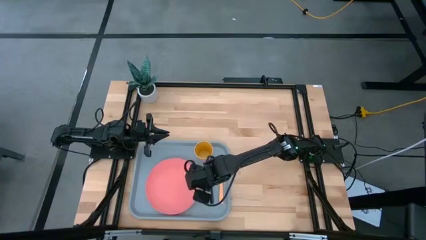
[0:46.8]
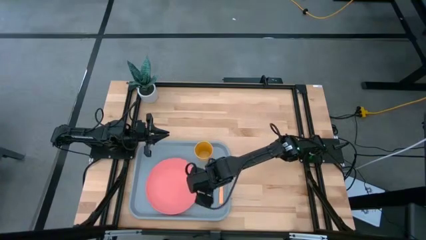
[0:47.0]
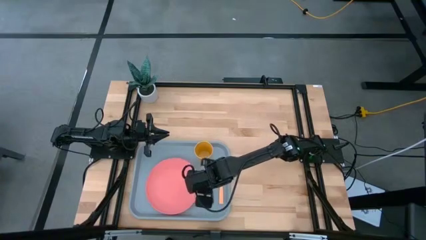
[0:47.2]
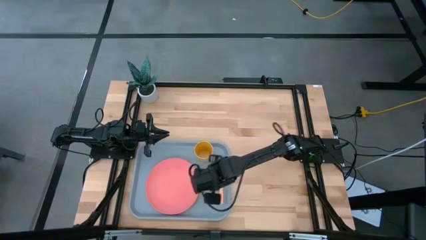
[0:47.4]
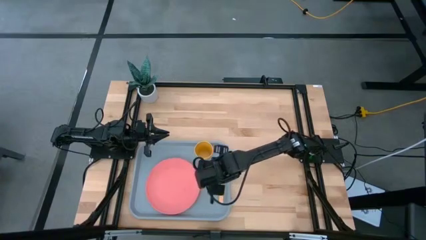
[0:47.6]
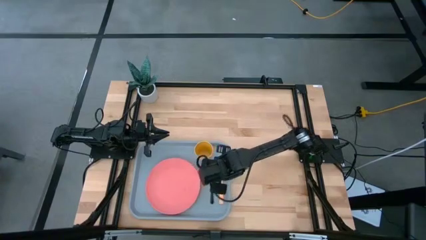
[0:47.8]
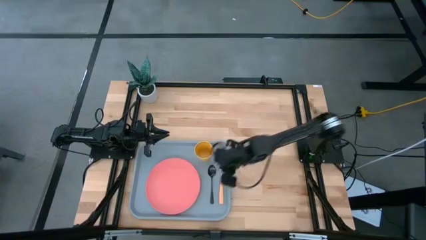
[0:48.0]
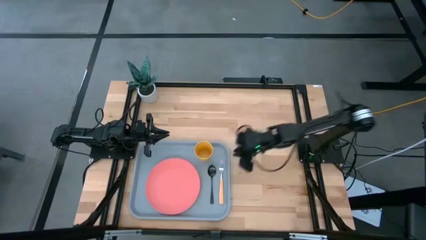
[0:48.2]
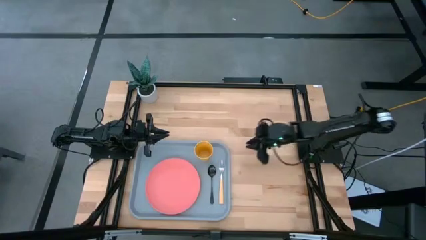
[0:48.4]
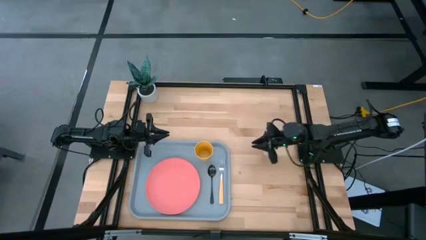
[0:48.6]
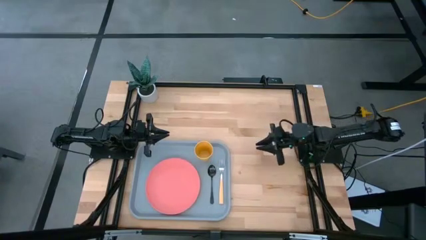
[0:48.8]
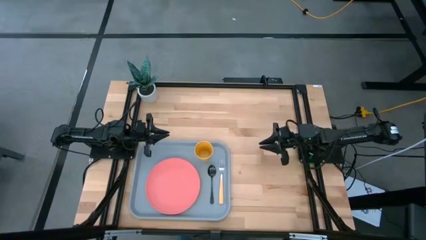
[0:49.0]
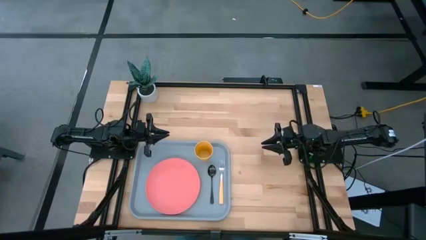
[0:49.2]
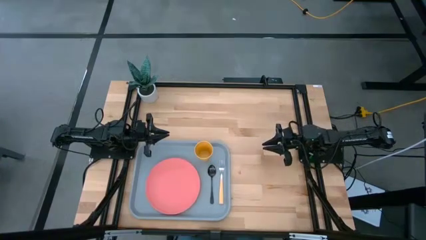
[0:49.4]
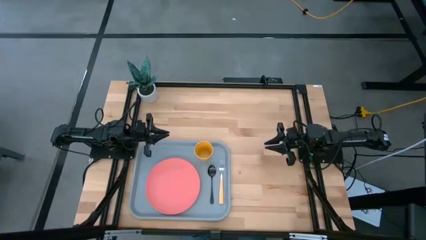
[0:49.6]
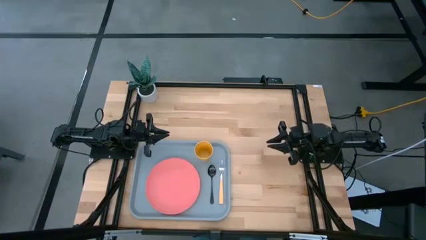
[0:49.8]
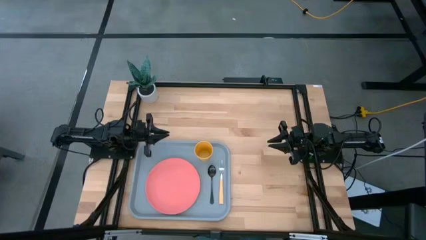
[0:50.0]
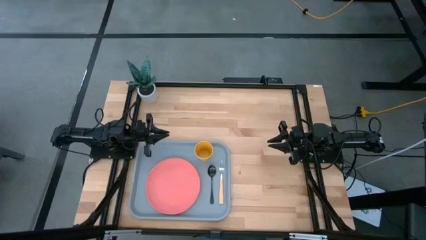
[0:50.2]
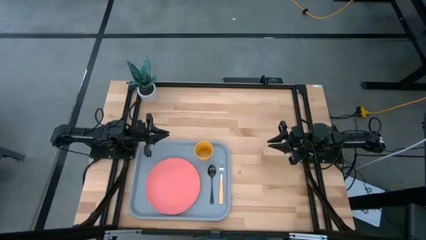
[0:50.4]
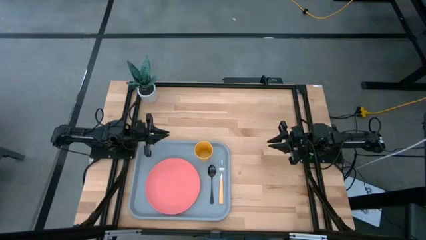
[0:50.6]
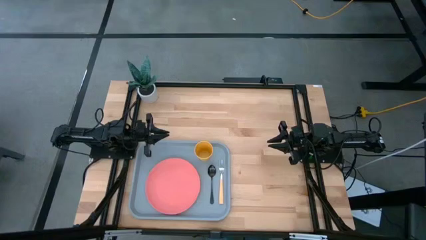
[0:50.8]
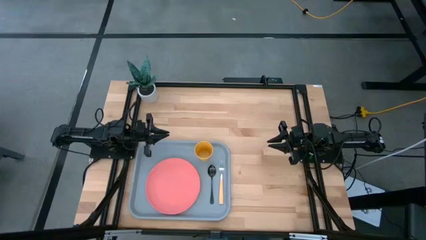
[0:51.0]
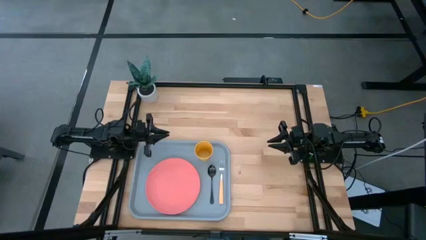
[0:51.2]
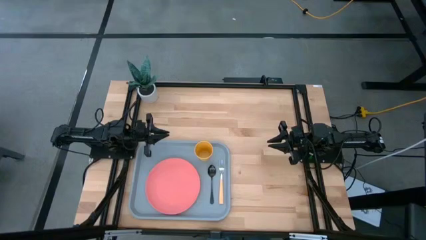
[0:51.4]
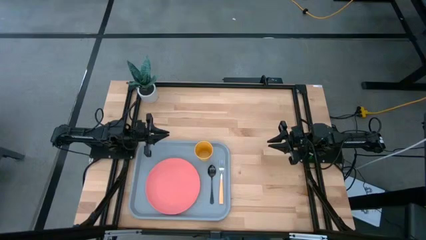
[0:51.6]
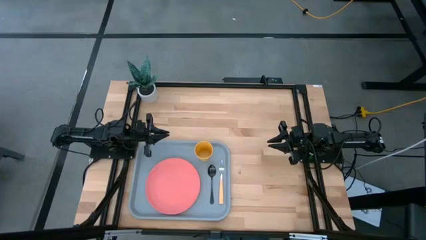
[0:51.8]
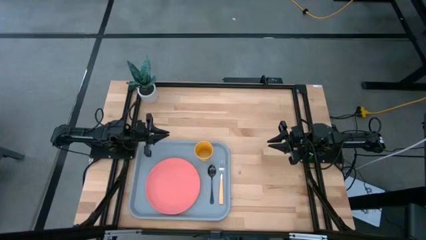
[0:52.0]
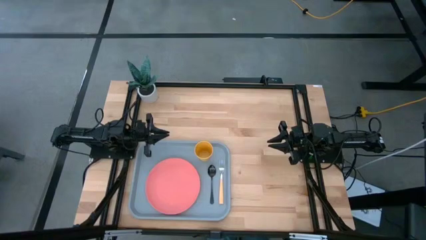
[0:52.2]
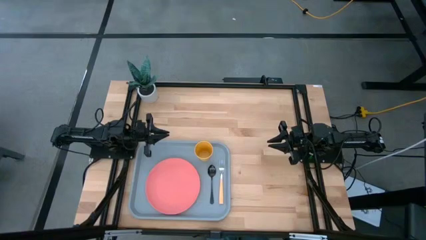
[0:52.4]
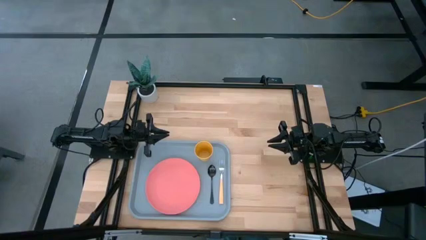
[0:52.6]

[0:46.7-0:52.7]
Task: Pick and place plate/cup/fork/spoon on tray
Return to Home Position

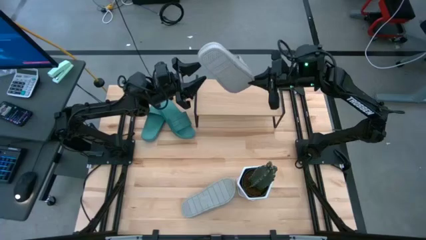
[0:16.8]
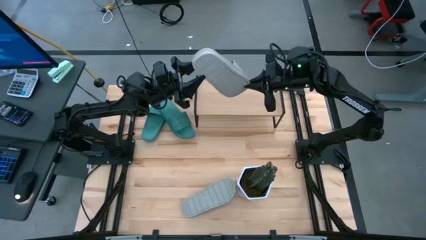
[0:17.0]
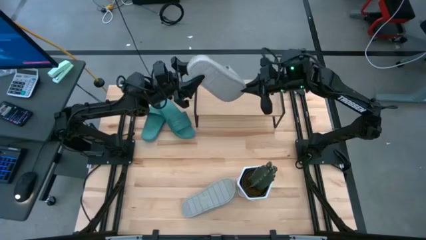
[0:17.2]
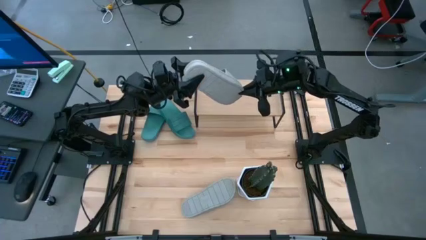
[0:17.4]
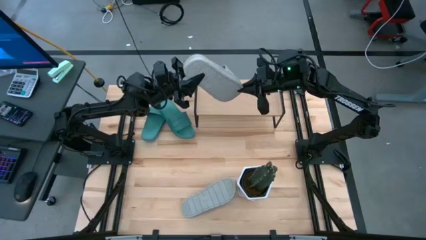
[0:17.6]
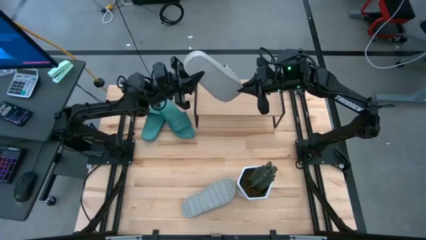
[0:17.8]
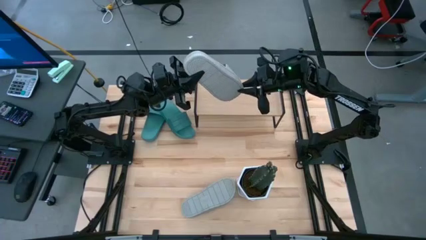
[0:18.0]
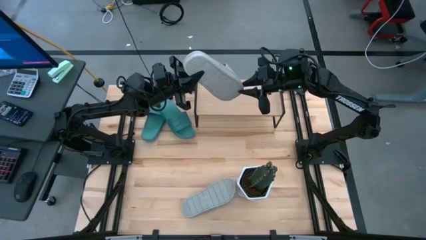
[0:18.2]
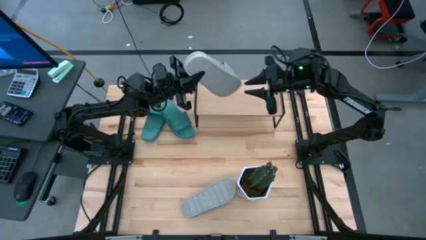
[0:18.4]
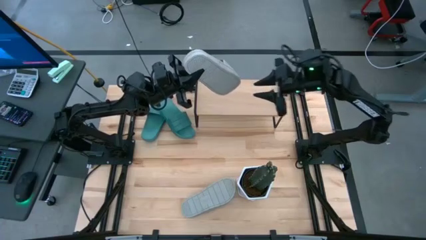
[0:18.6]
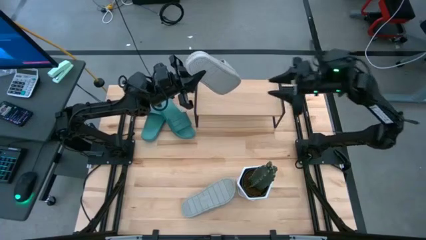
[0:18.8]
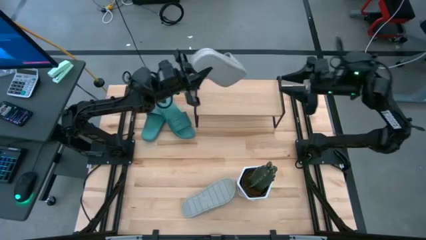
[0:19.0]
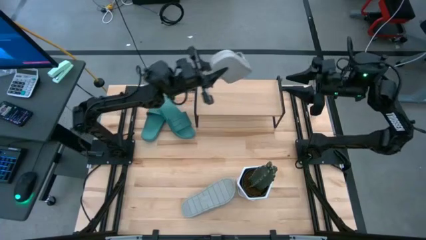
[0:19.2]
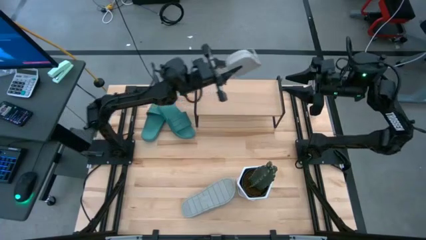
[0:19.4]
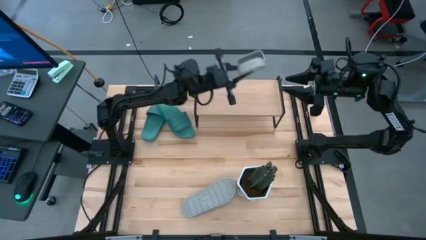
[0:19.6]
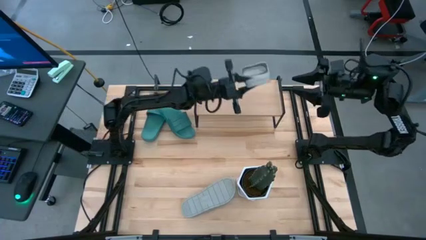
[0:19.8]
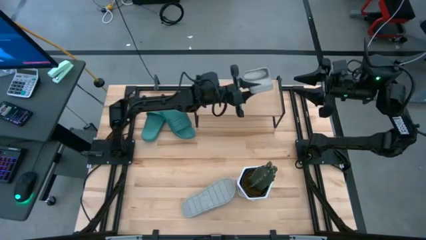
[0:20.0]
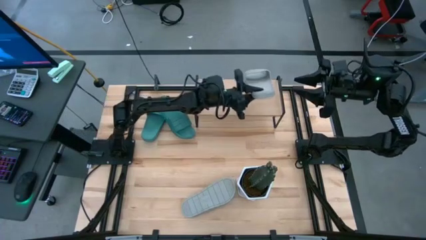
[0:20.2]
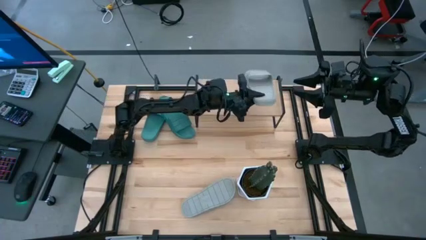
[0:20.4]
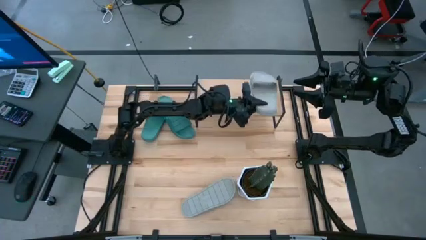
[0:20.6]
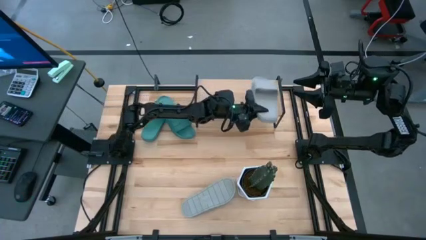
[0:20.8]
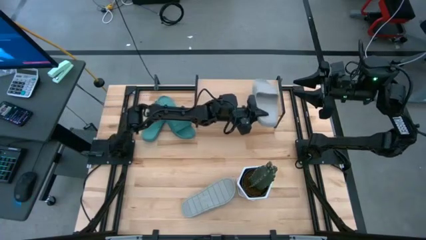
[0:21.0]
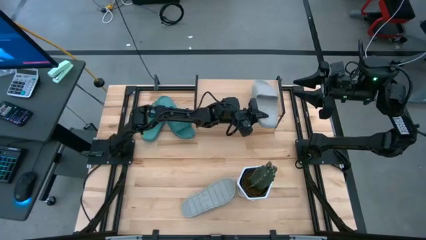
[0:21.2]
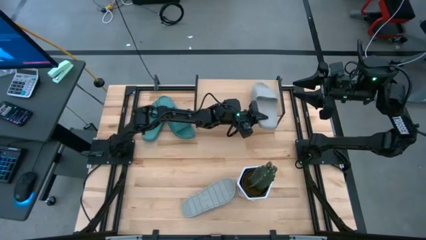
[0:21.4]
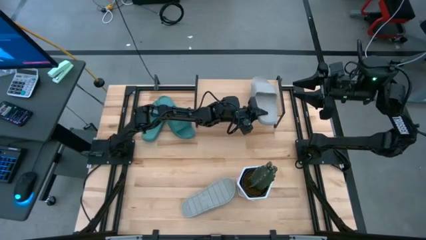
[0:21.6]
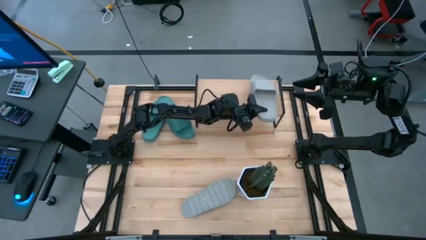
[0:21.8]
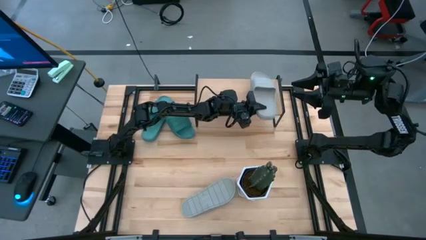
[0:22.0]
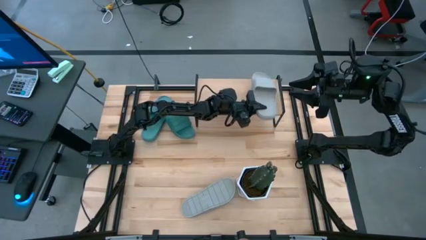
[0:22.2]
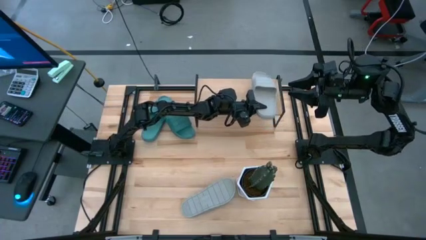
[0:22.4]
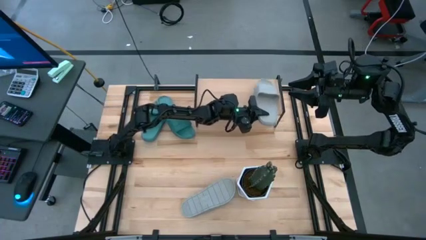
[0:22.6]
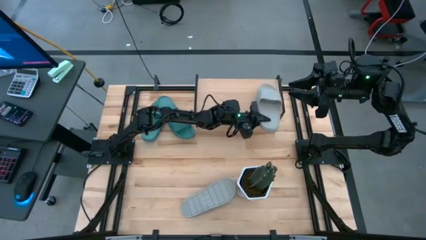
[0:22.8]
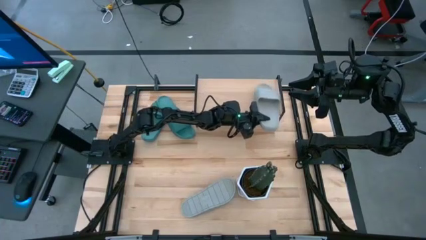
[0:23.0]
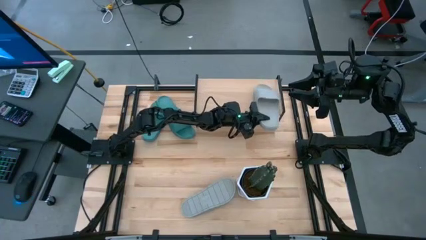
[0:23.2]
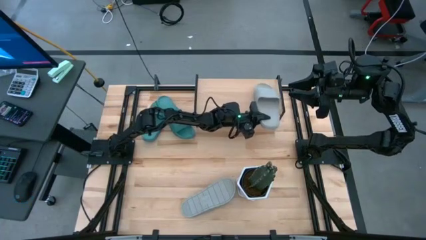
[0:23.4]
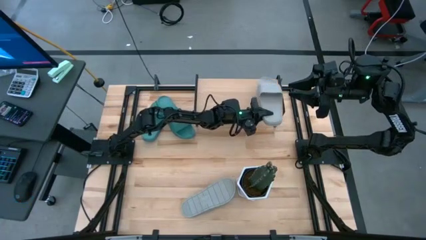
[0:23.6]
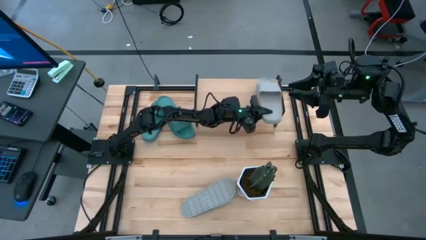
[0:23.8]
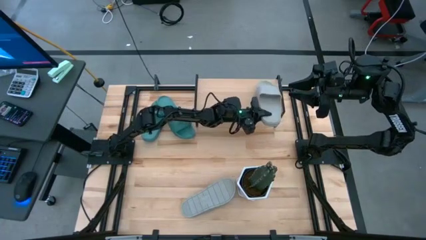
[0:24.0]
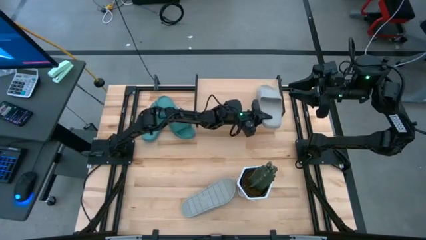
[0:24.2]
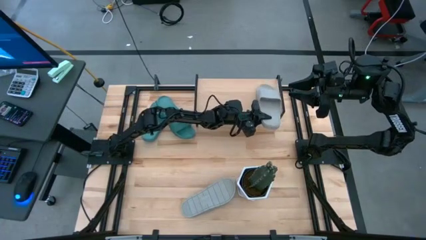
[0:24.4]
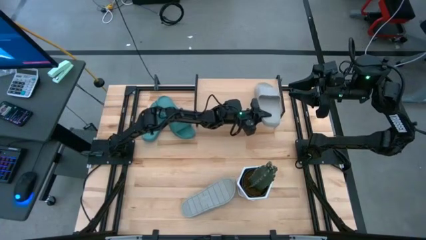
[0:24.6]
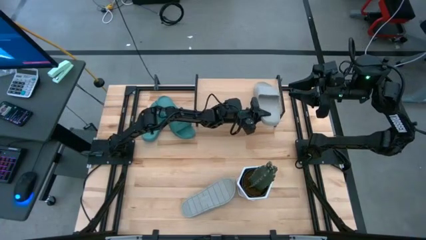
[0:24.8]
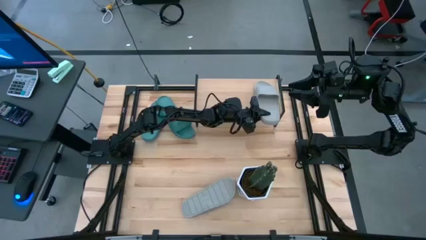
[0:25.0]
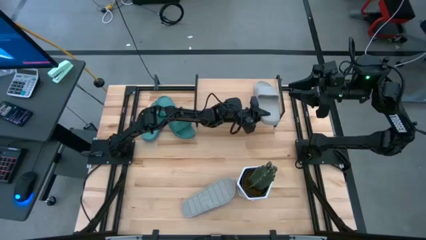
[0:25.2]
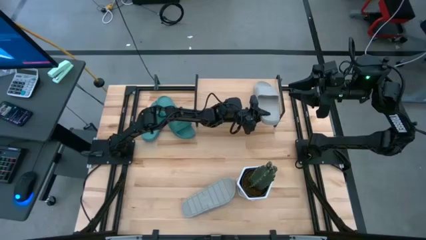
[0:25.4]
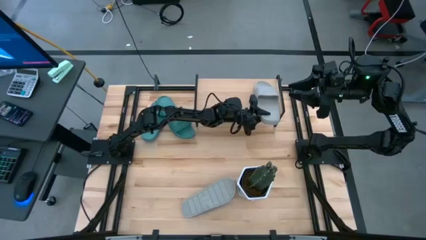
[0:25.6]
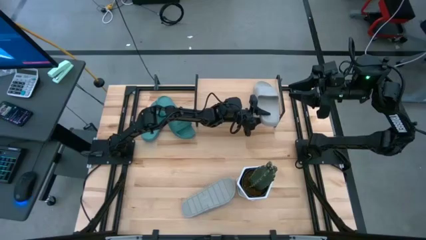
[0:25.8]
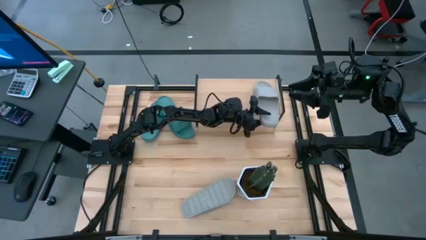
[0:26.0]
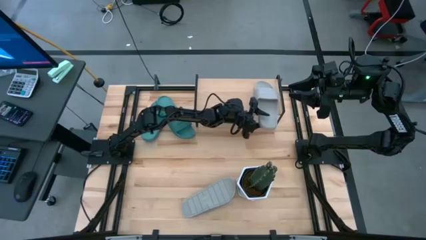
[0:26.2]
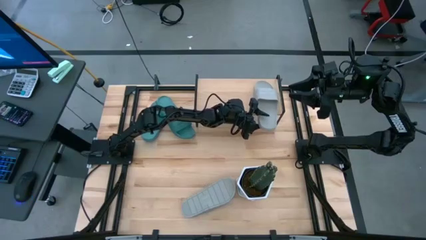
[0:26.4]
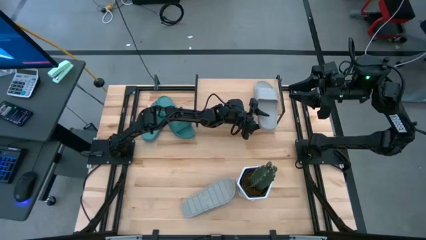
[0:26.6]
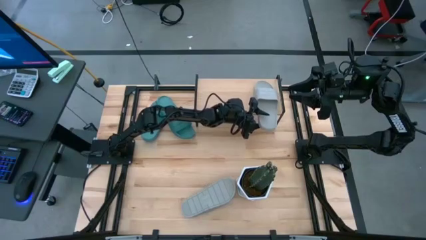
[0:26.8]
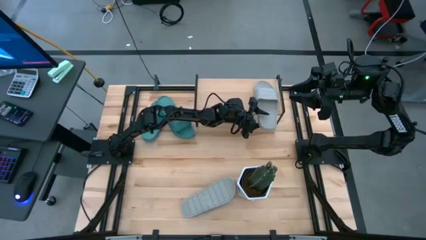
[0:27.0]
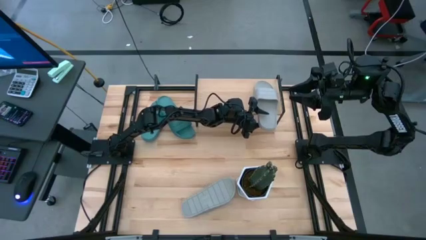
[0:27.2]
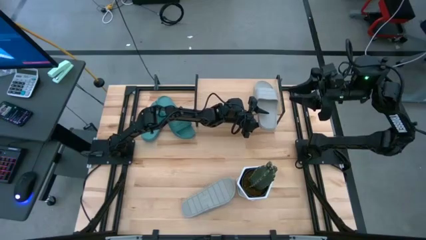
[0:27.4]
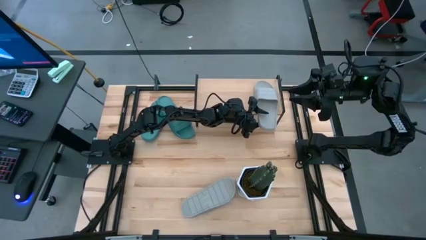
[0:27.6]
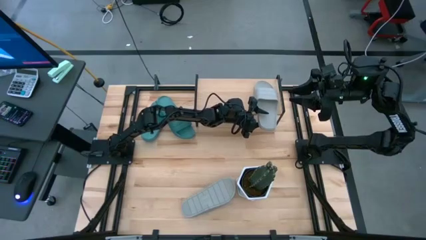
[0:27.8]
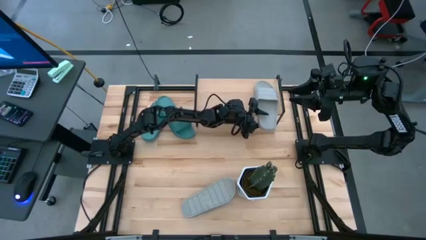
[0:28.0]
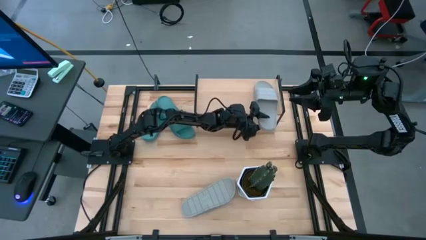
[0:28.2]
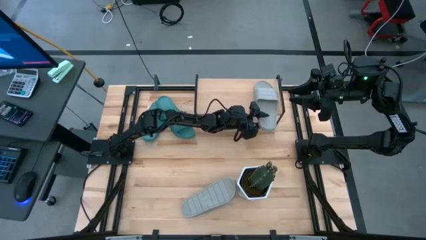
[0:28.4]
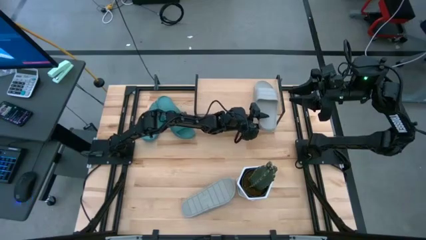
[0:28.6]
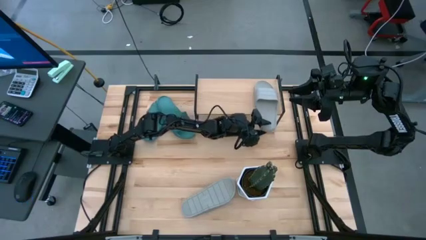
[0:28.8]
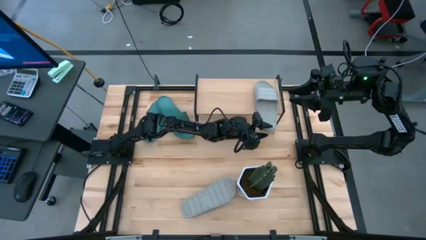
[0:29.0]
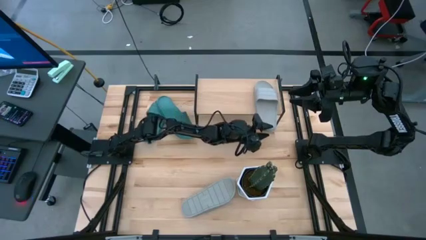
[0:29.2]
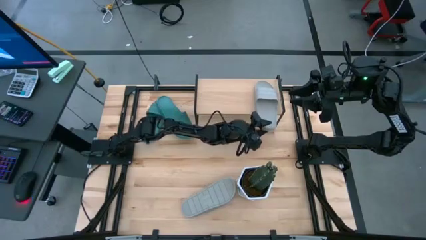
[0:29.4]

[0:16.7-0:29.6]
Task: Pick and place slides into the shelf
Put the right gray slipper on the shelf
